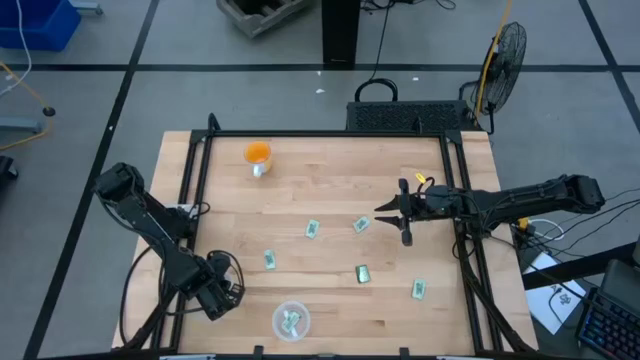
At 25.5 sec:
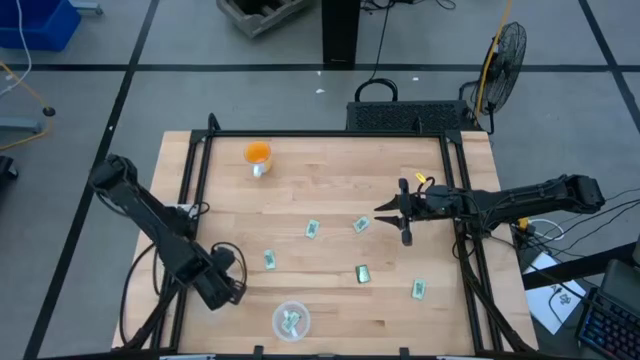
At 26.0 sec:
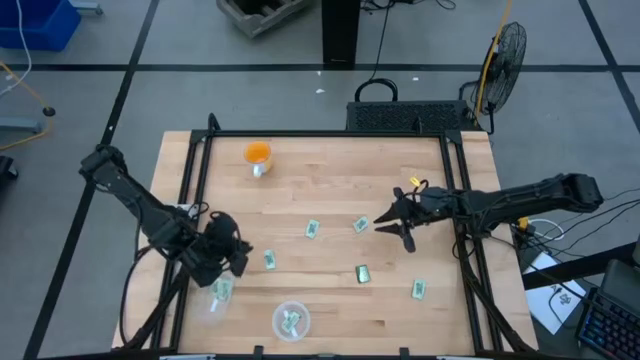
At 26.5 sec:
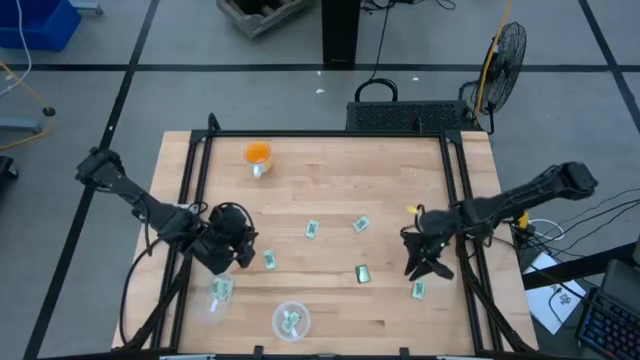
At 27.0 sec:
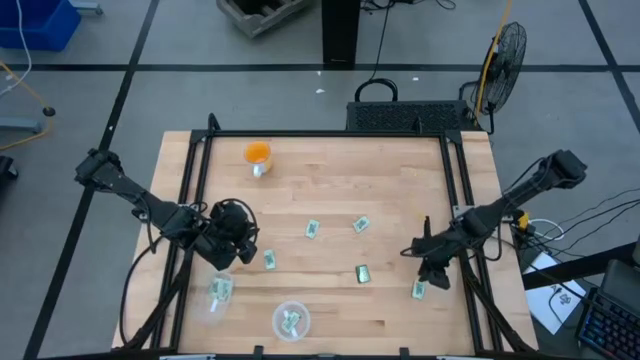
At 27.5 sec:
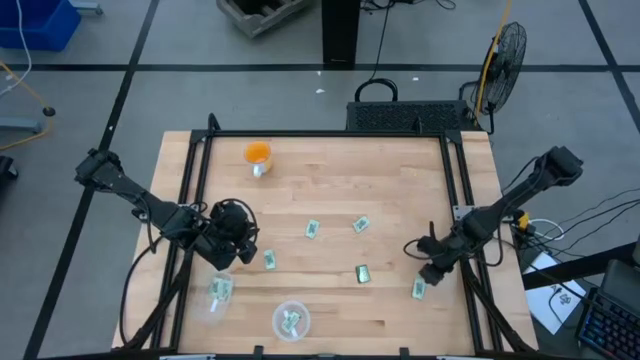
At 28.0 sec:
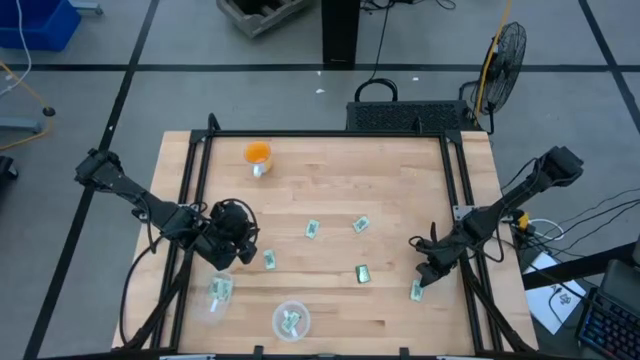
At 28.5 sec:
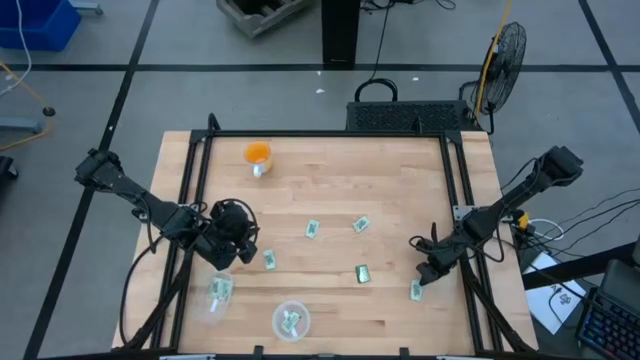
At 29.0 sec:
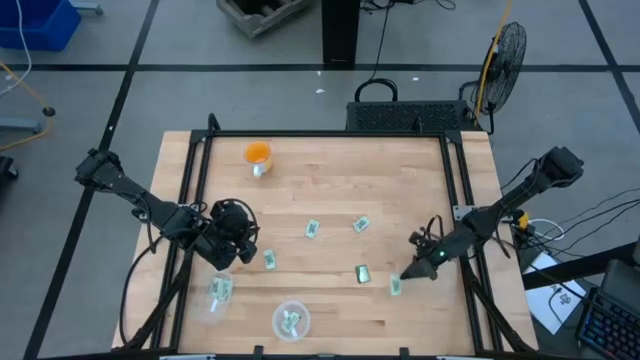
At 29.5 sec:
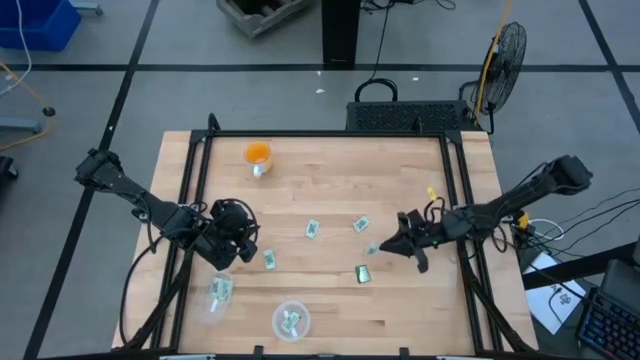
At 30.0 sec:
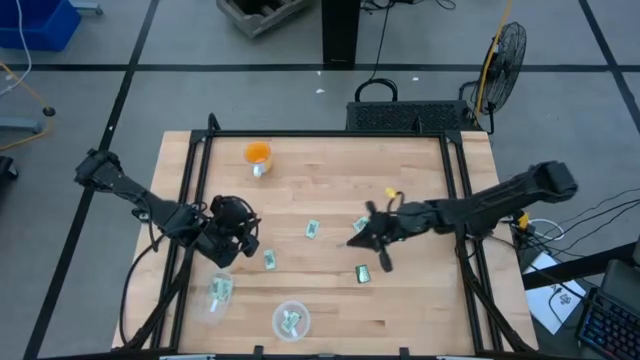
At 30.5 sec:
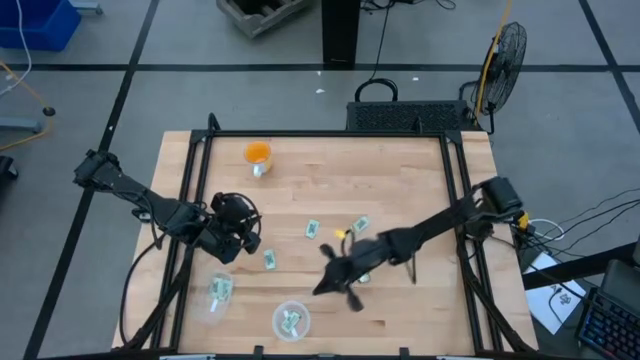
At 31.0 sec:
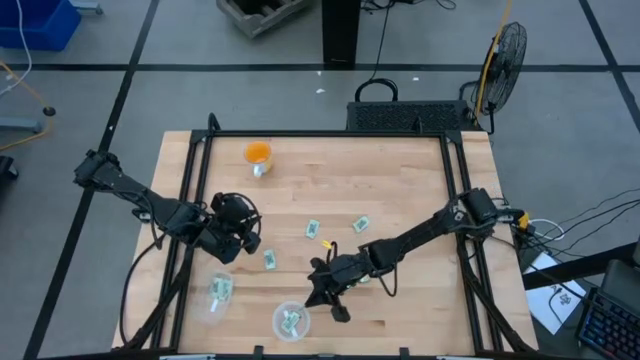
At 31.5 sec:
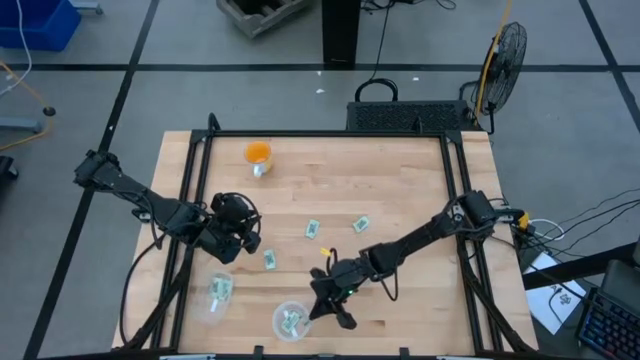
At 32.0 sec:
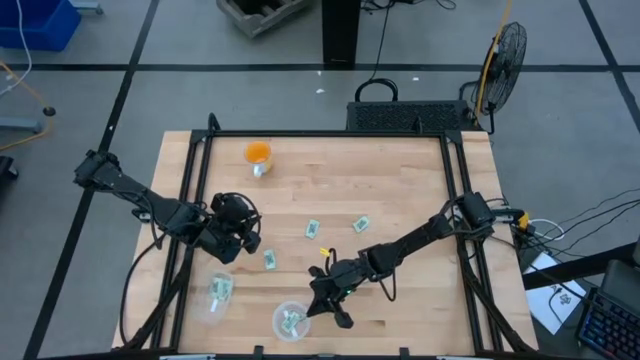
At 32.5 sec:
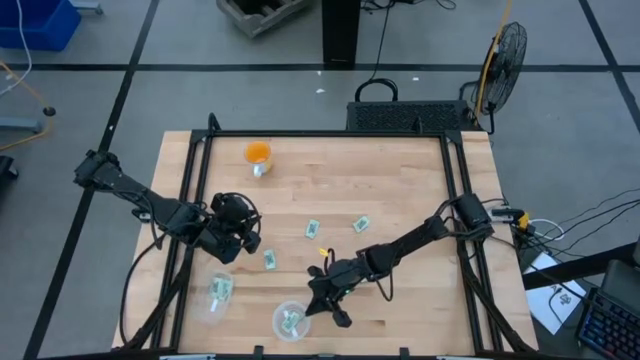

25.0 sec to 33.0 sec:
Task: Pick and place items into bin
Put the stevia packet into the right transparent bin

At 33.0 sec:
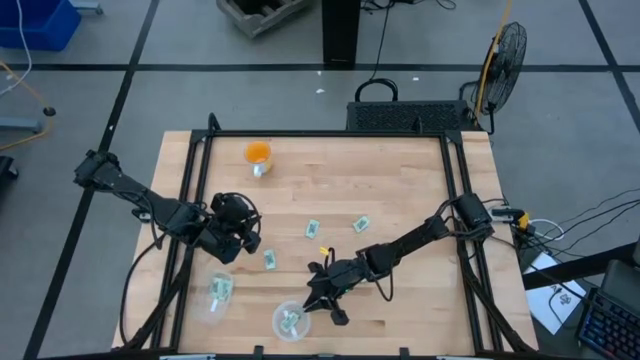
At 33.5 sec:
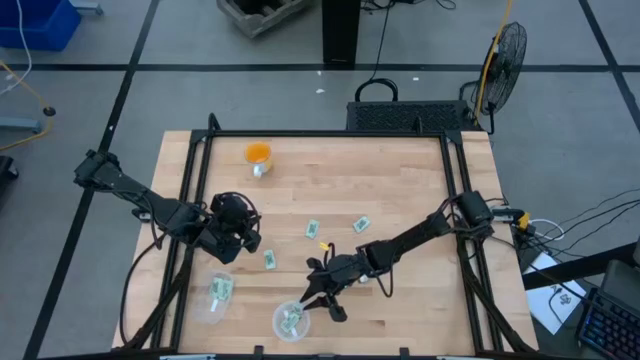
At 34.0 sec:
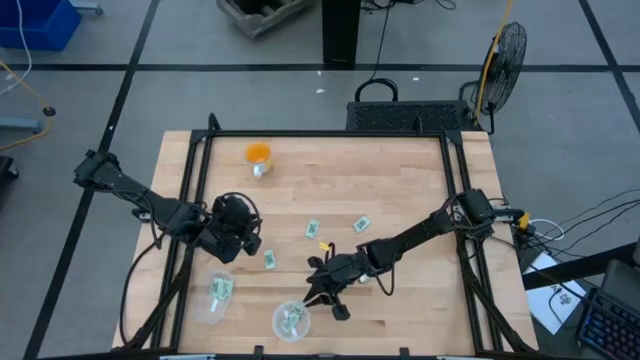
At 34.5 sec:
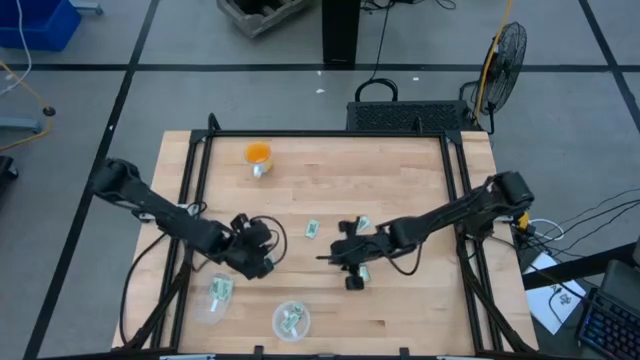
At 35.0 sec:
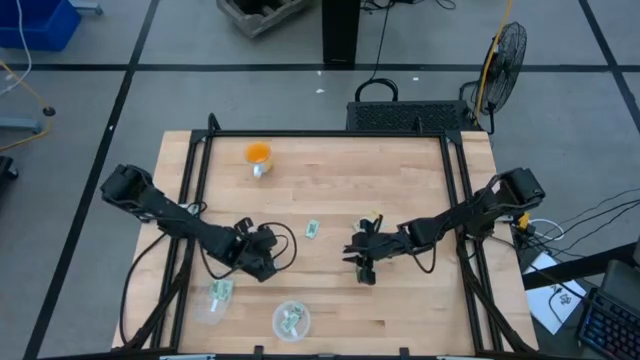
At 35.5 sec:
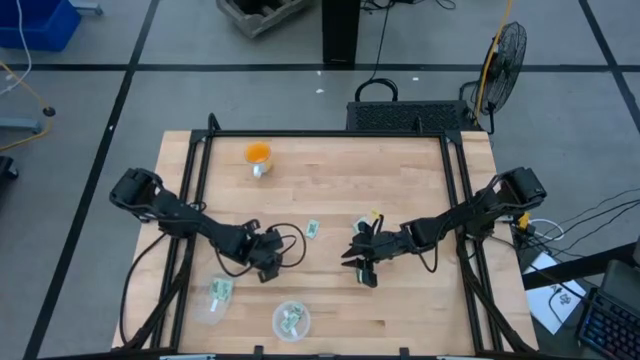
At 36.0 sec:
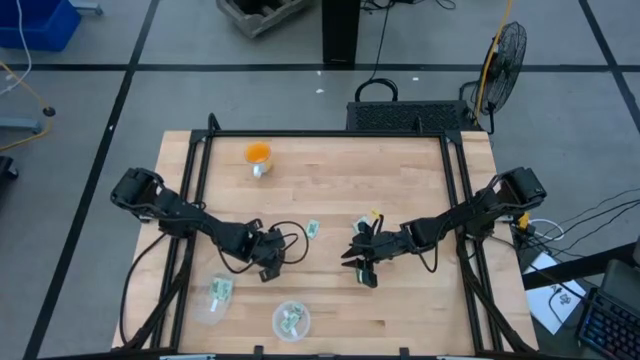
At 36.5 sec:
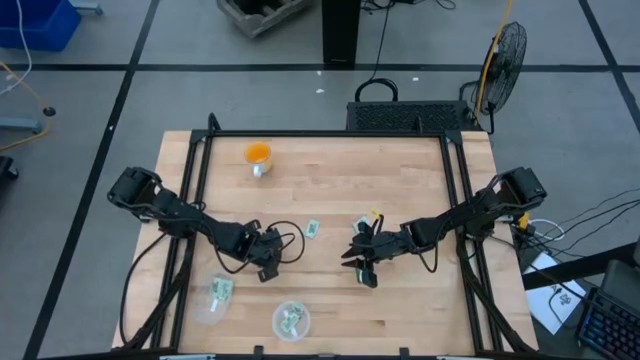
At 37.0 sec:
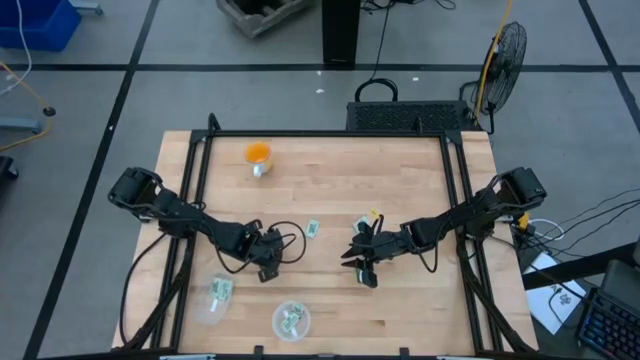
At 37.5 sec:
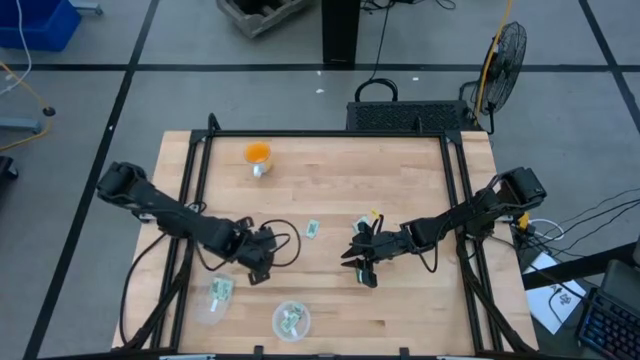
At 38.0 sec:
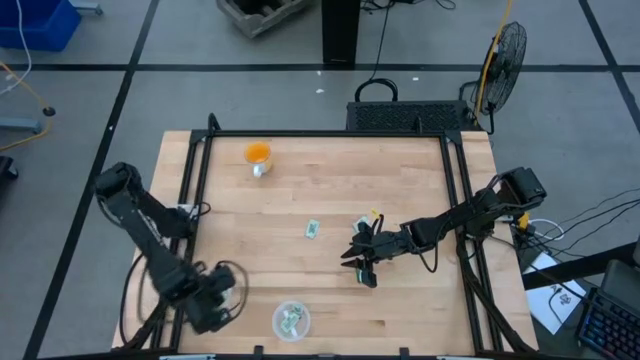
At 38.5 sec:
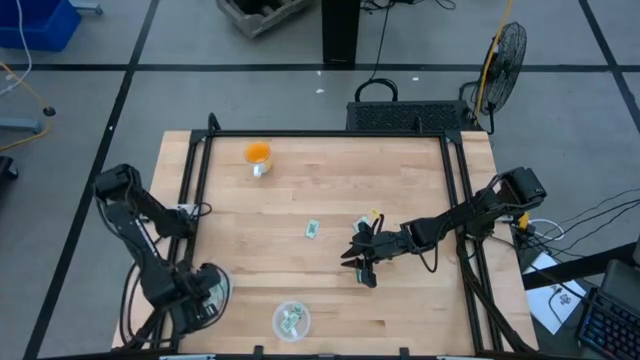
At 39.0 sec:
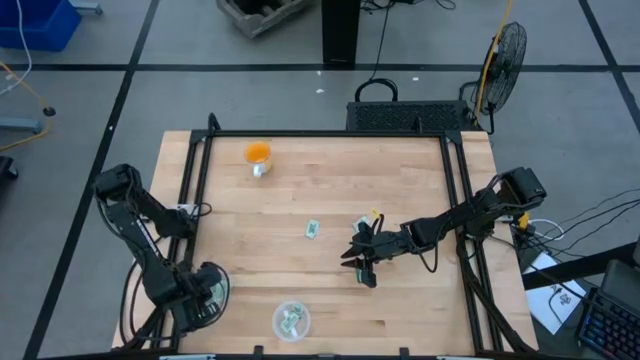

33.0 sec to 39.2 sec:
Put the stevia packet into the left transparent bin

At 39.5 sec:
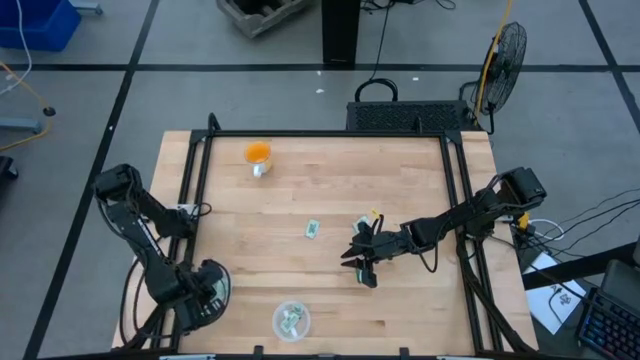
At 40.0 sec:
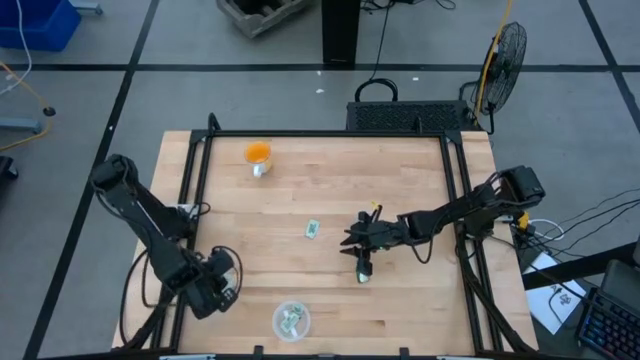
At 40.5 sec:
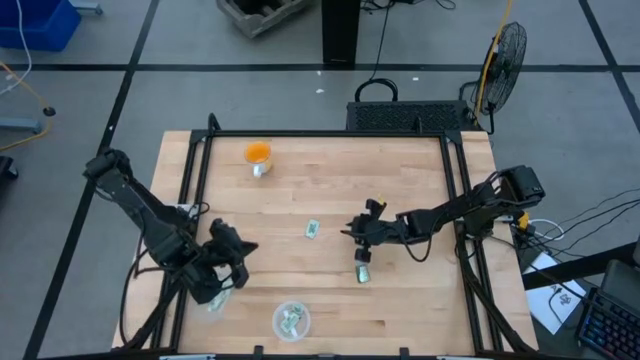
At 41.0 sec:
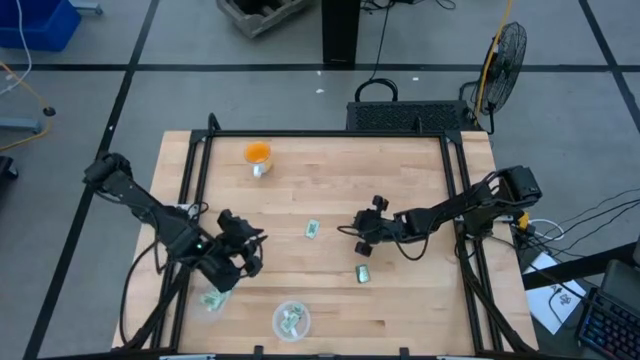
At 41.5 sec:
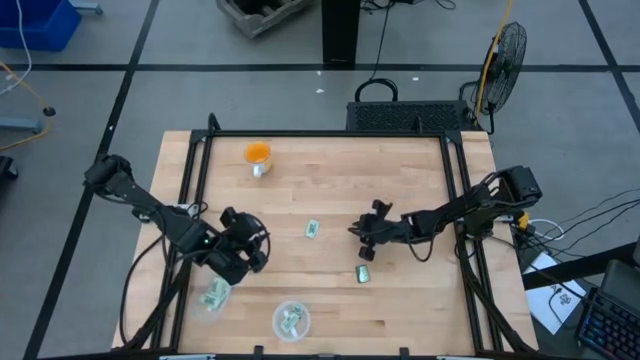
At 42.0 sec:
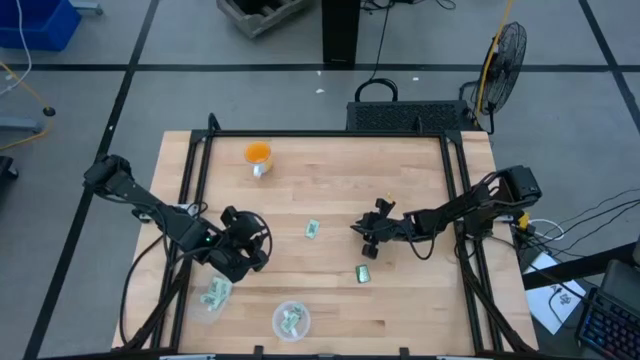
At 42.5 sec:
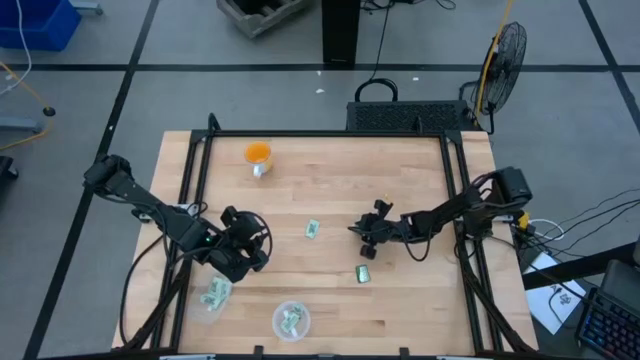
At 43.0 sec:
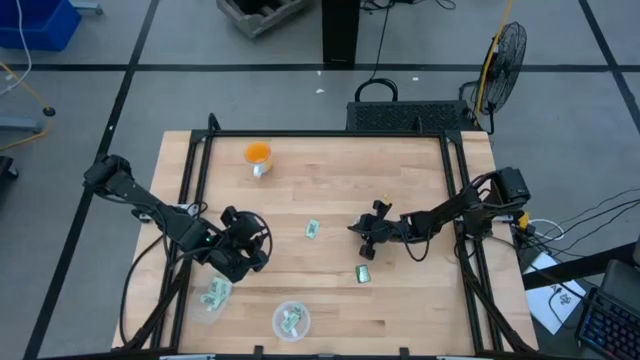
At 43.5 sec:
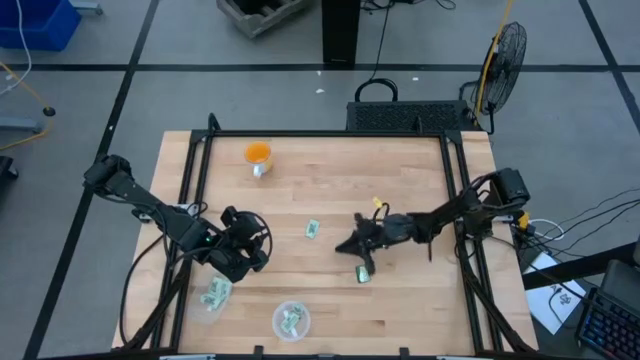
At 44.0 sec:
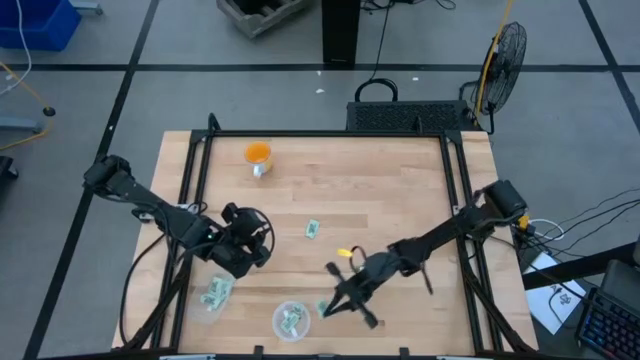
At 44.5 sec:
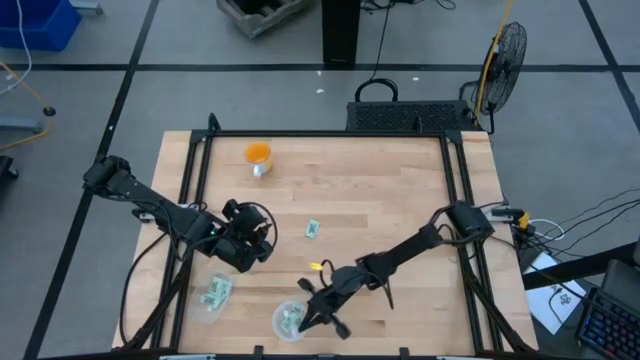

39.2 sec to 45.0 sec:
Put the stevia packet into the right transparent bin

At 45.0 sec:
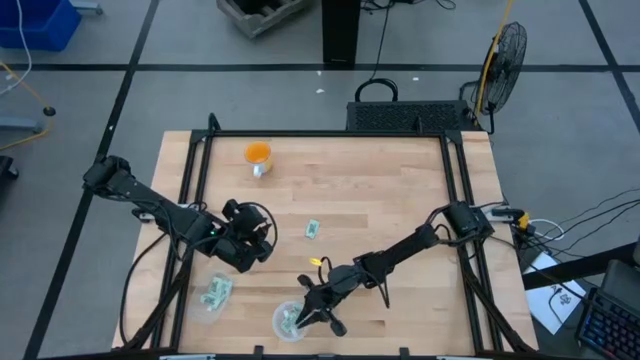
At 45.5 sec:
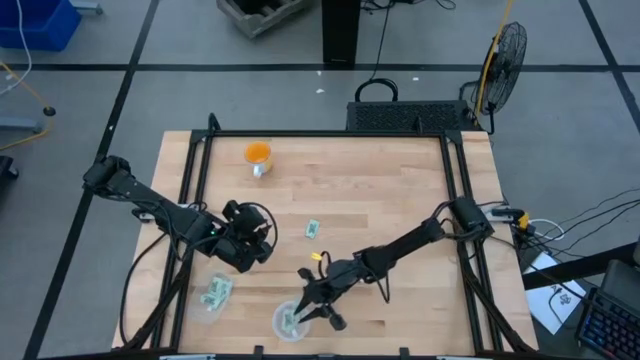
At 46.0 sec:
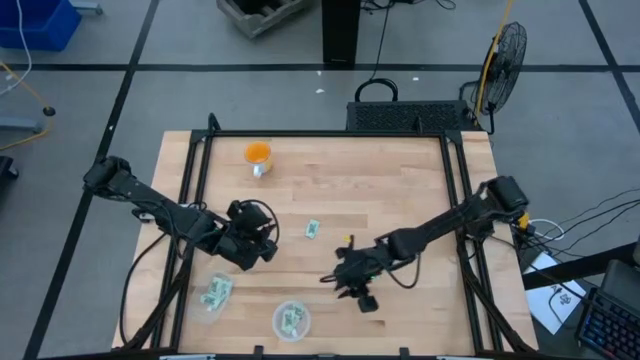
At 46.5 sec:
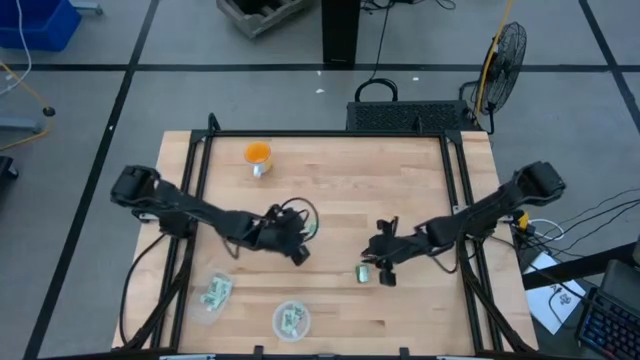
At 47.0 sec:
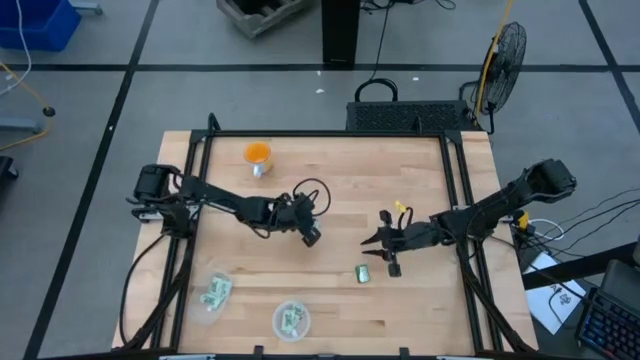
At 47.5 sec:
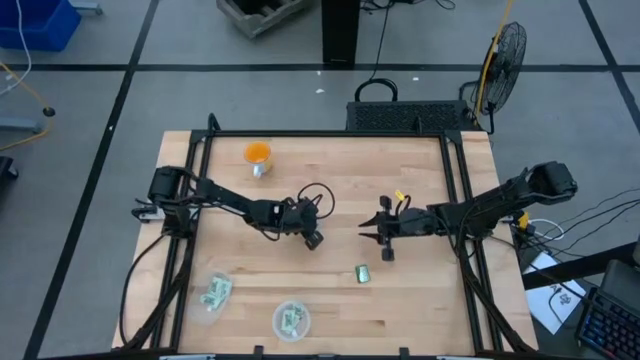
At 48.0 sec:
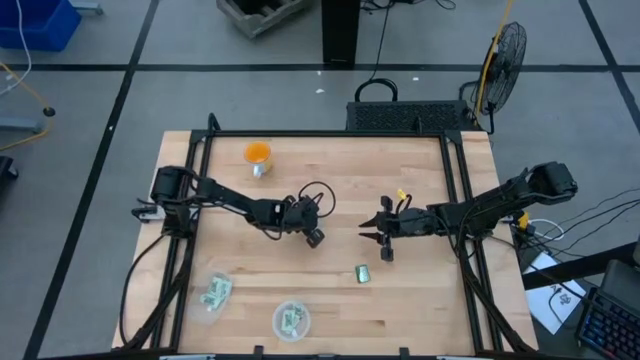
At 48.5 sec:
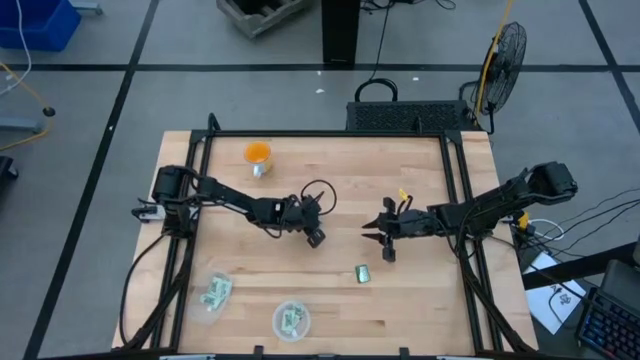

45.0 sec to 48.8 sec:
Put the stevia packet into the left transparent bin
